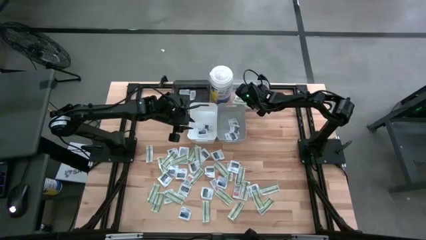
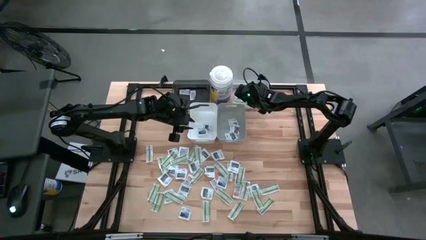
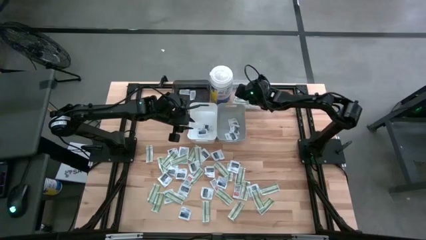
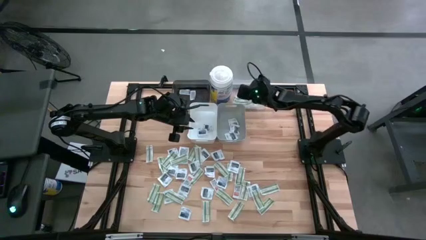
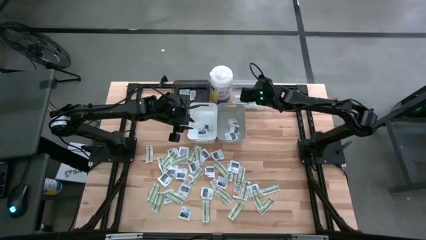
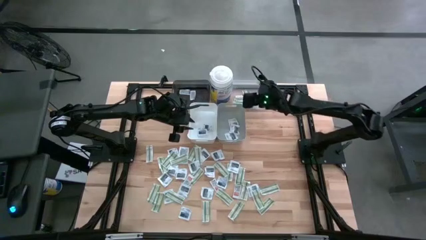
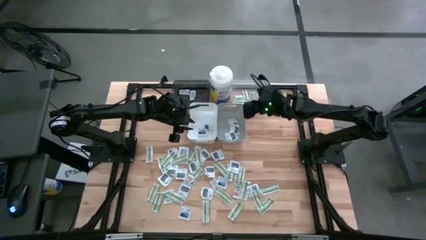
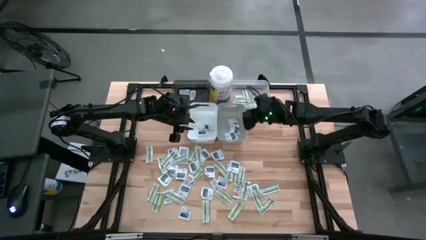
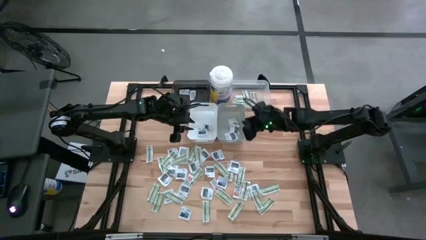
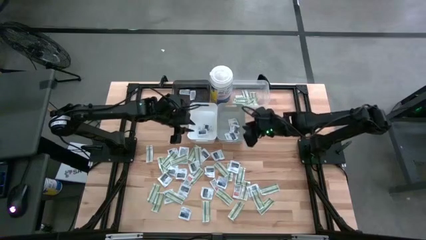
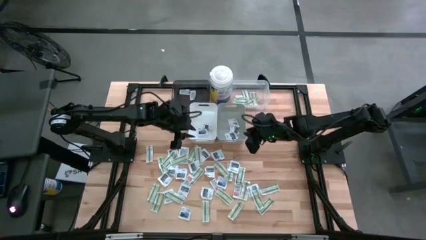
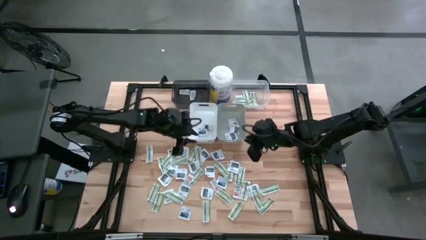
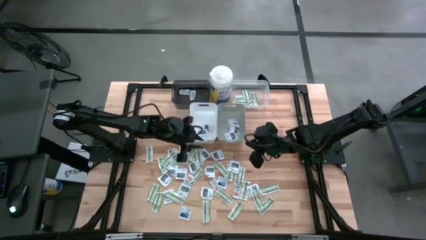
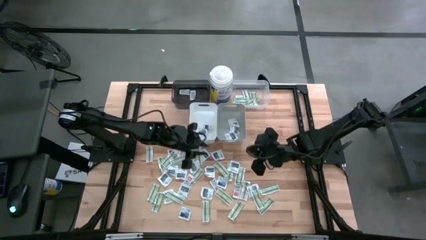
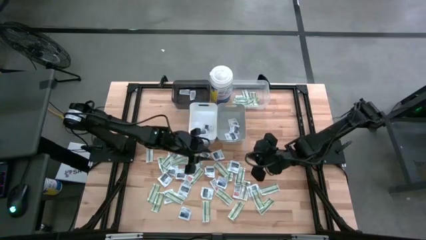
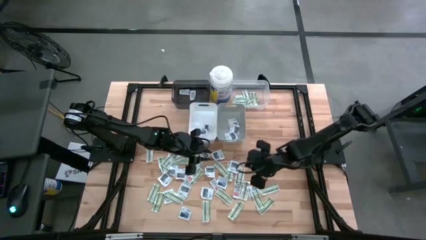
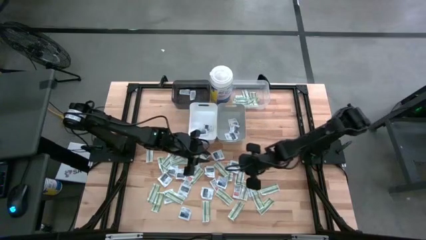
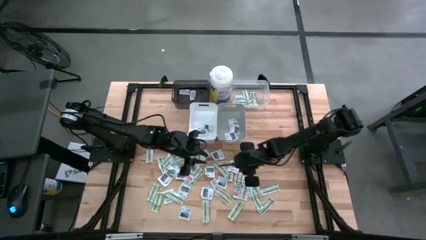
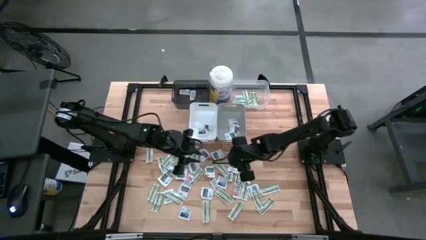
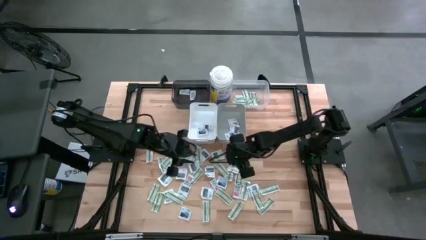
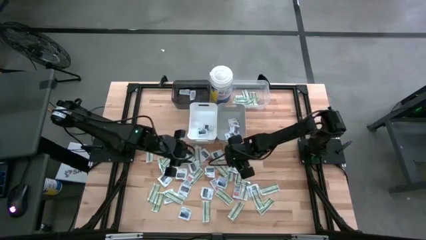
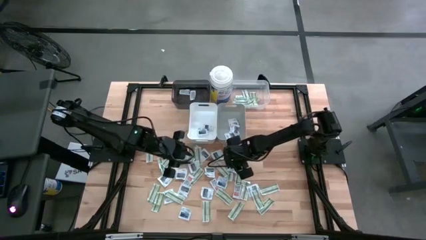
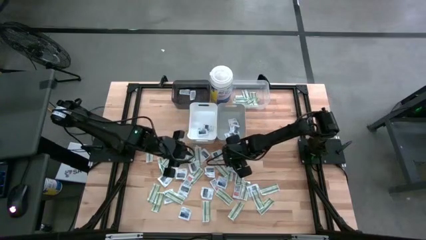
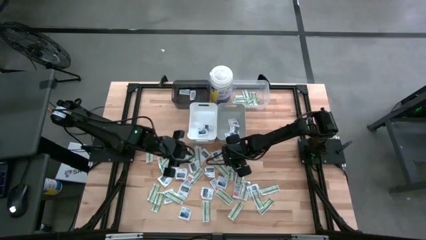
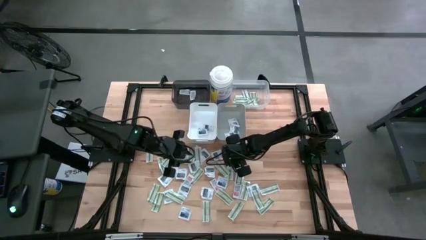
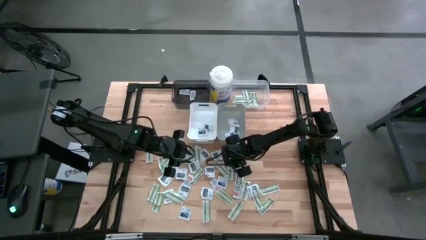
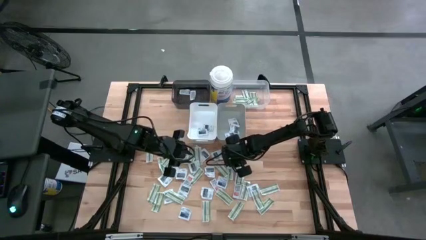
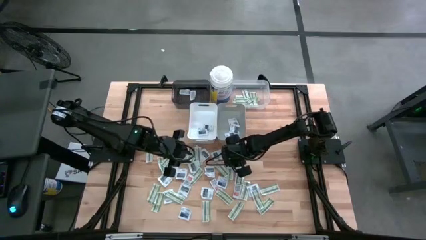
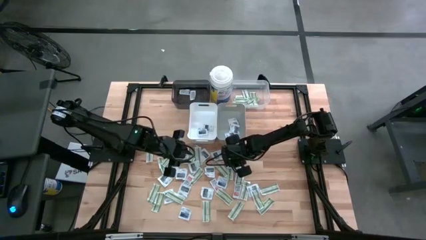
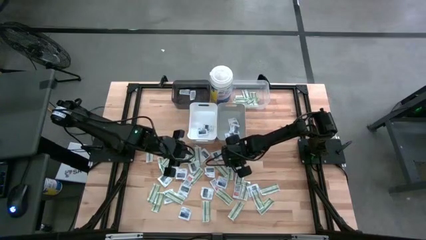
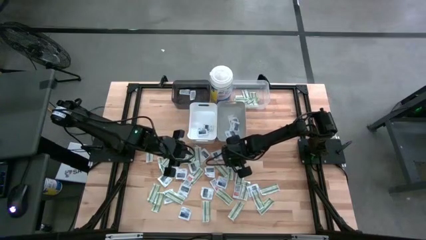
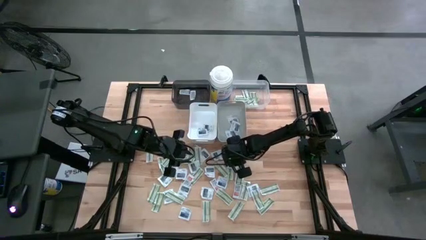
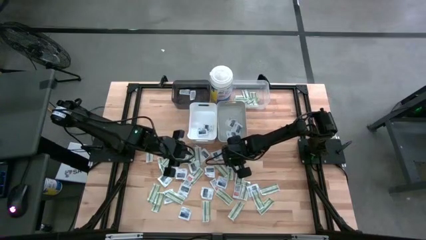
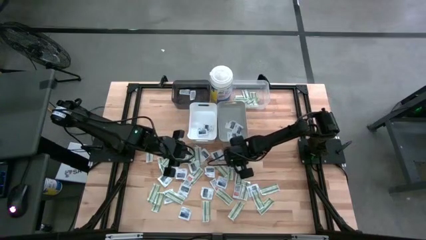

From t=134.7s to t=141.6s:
Task: Pick & Place First Aid Supplies
Put the wipe into the gray bin

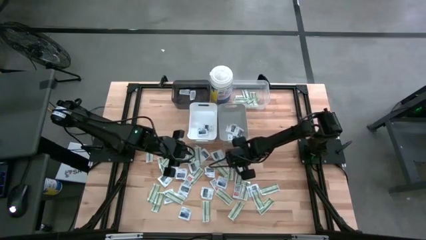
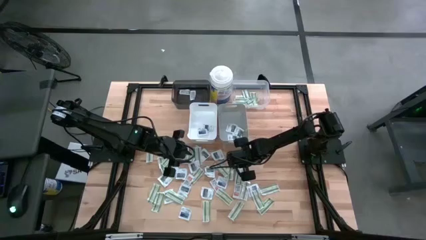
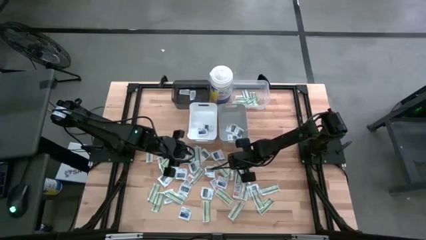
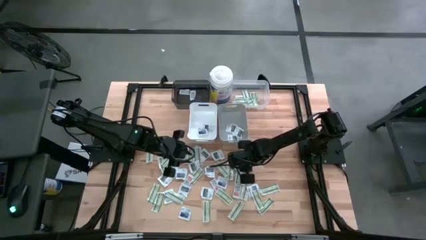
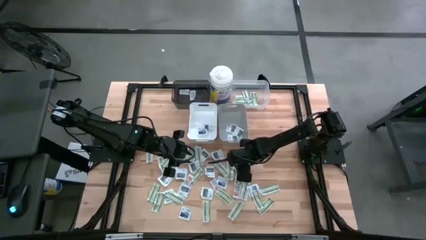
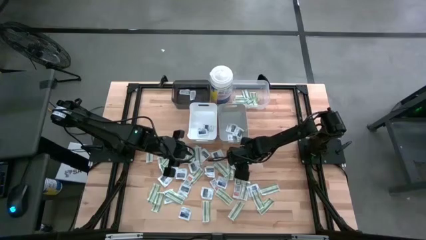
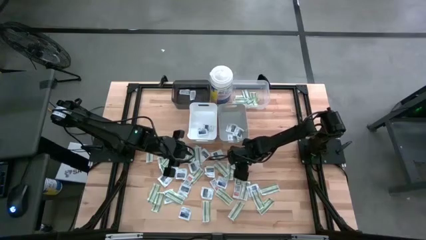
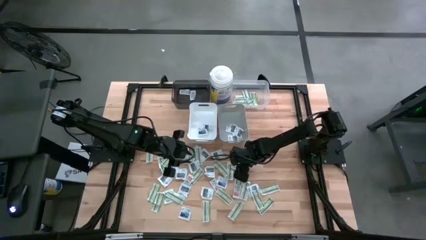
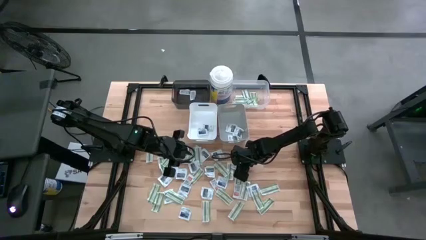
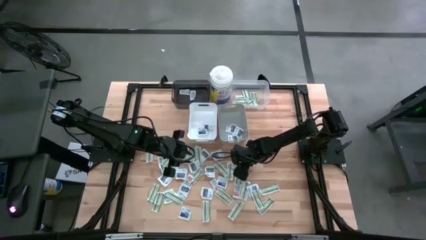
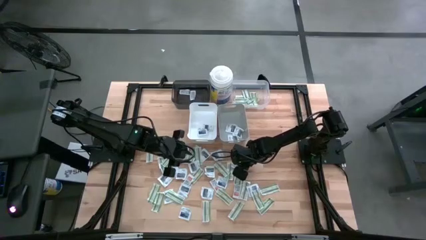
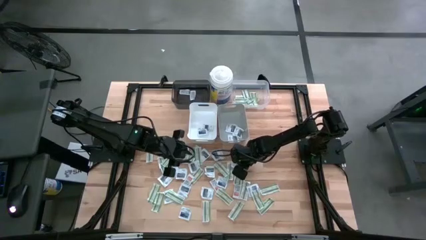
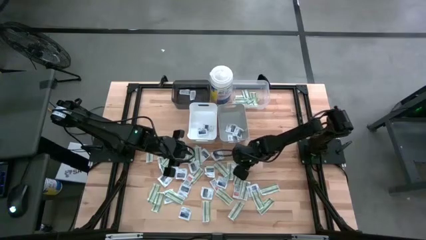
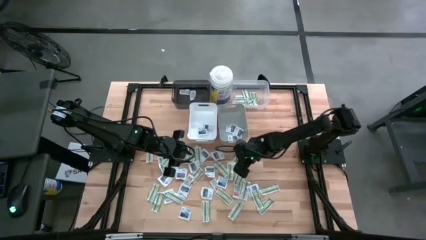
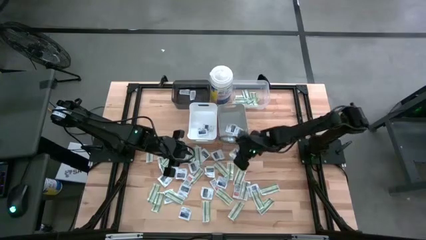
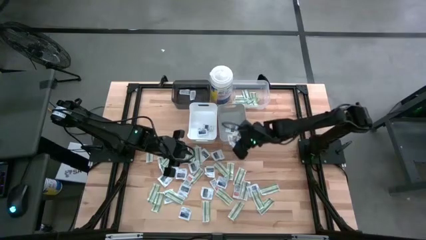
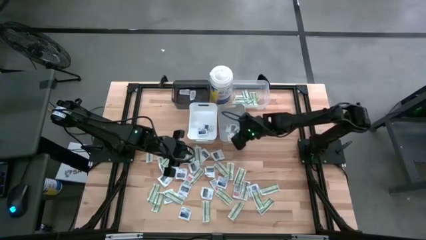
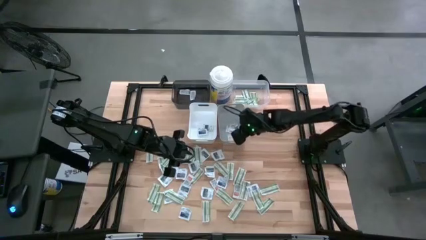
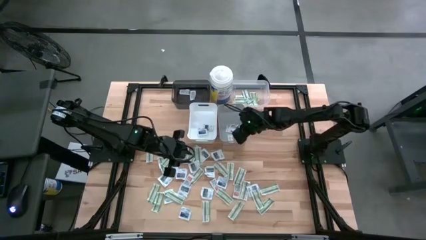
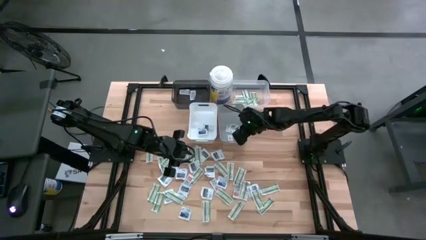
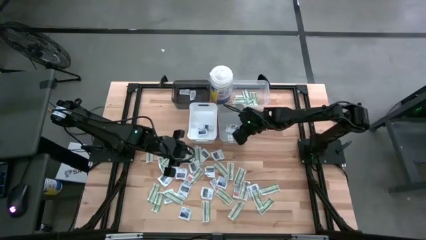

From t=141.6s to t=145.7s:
Put the wipe into the gray bin

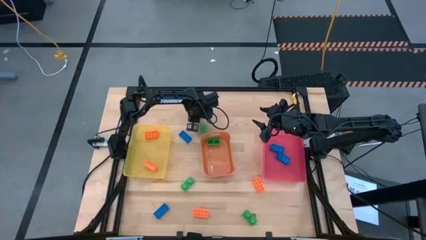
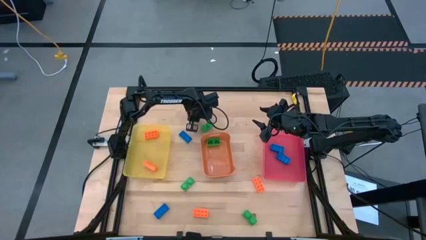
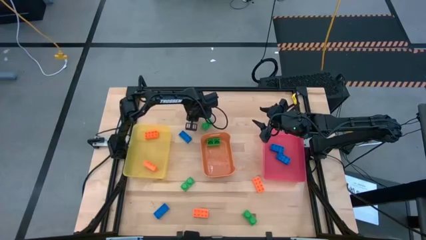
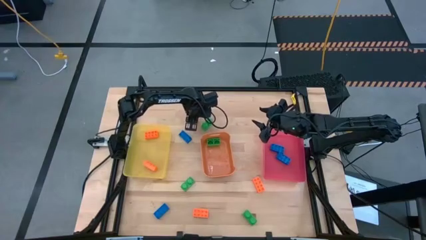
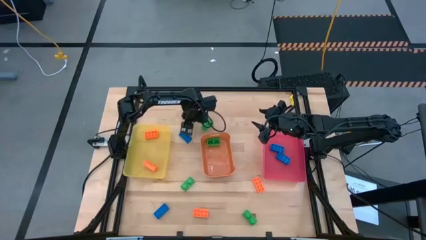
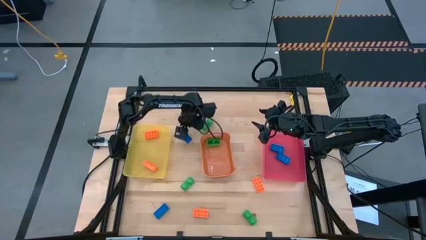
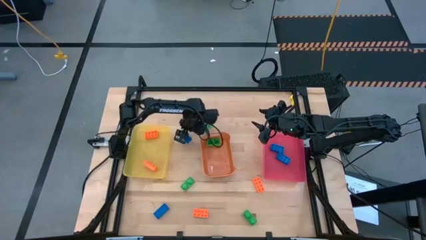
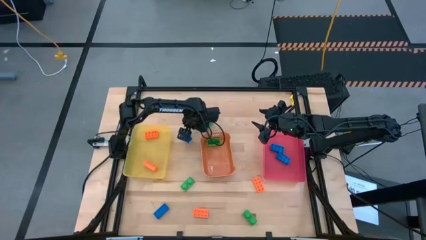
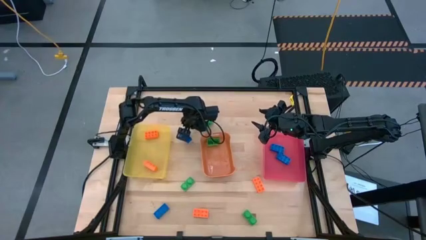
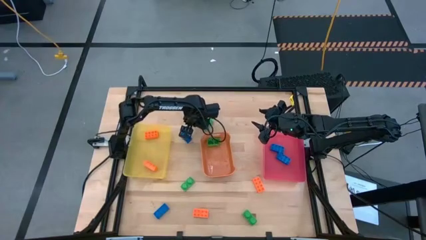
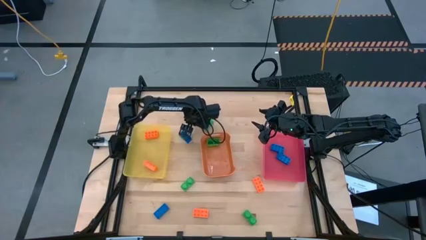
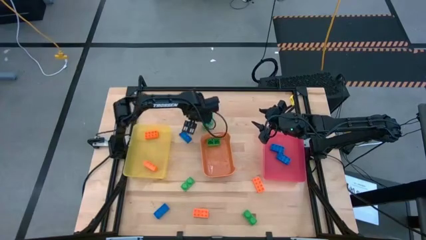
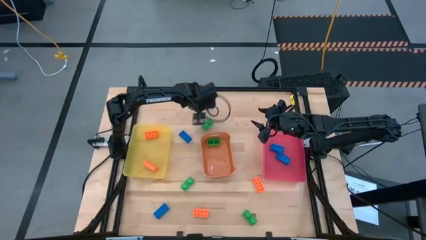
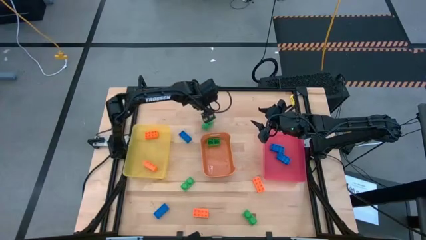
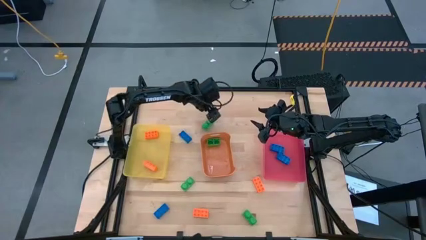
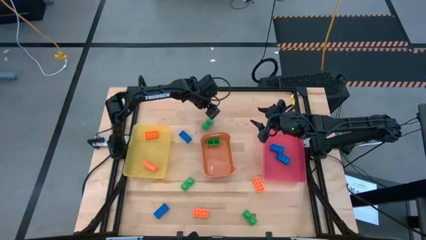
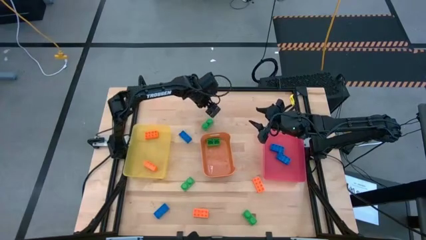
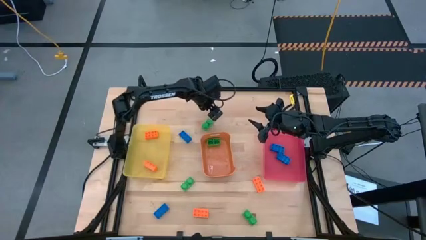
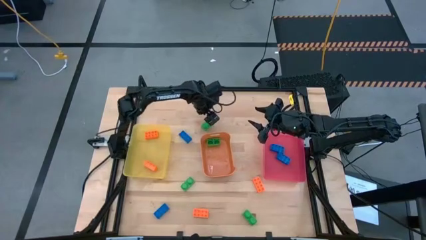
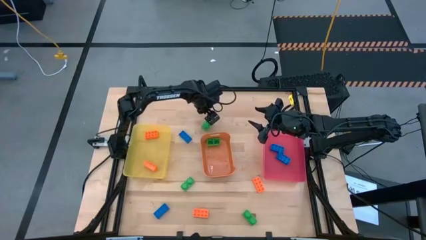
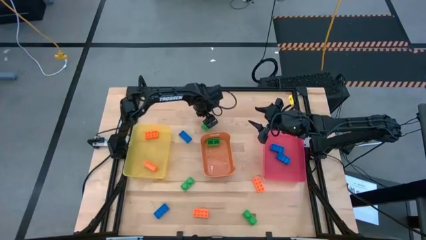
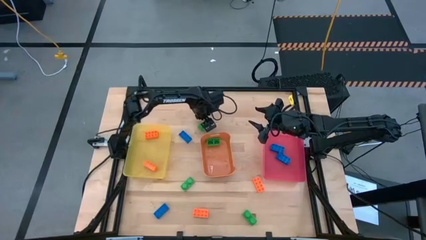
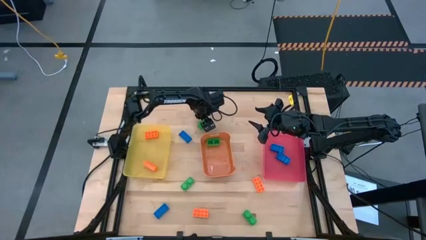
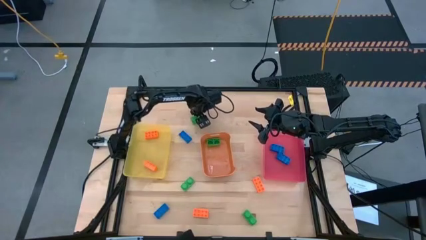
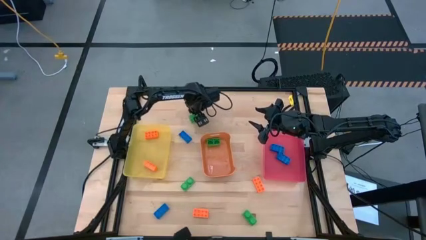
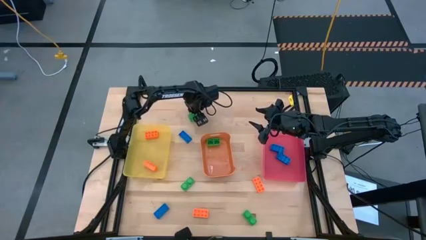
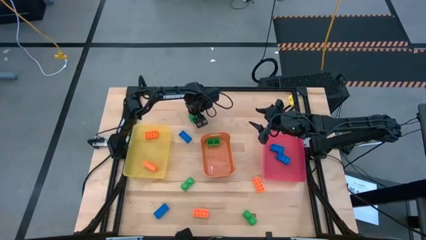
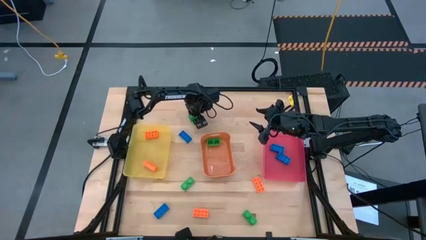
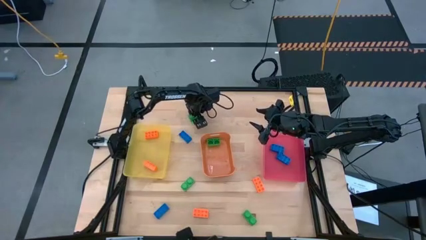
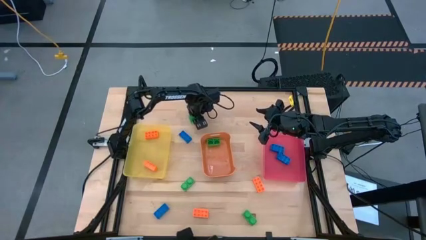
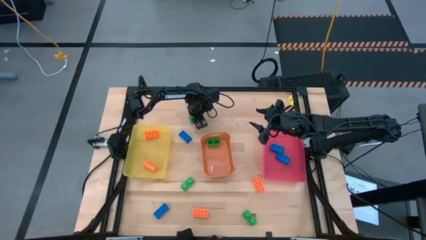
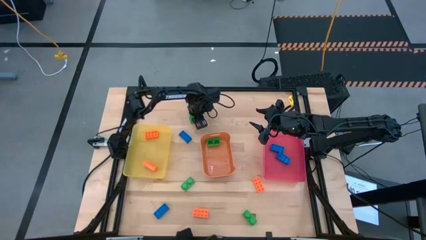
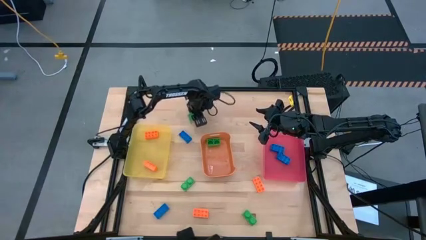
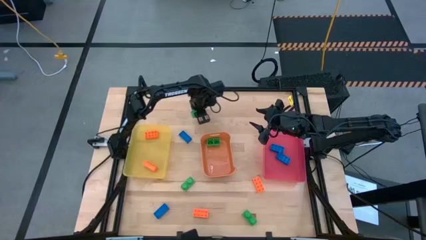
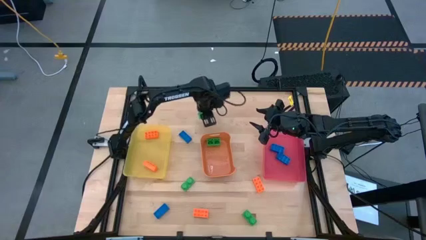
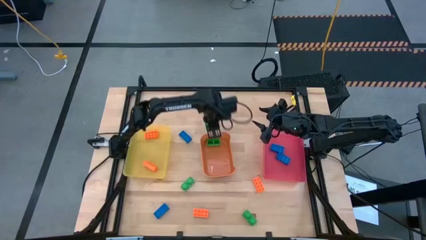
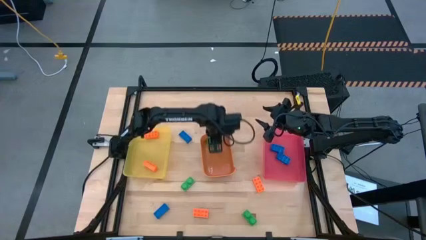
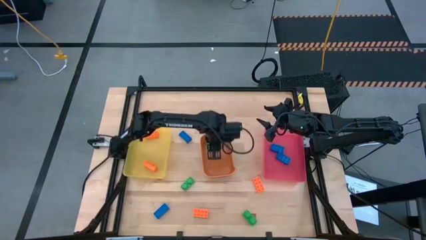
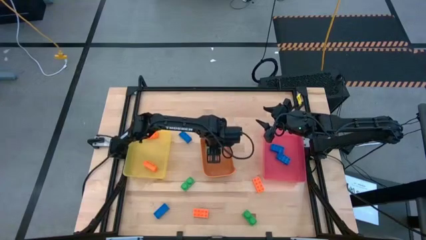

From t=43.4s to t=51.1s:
Task: Sort & place blocks by color
Put the green game piece into the orange bin
